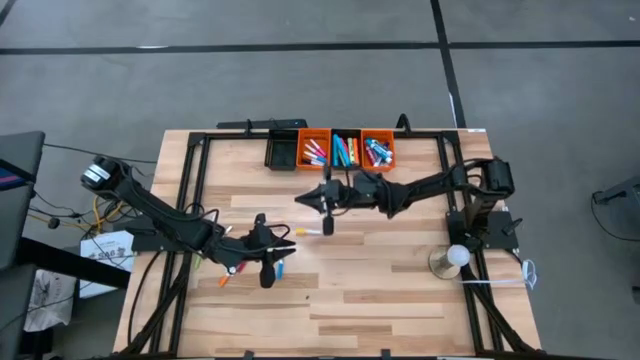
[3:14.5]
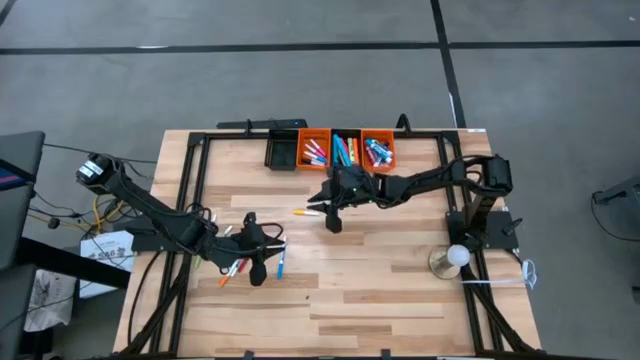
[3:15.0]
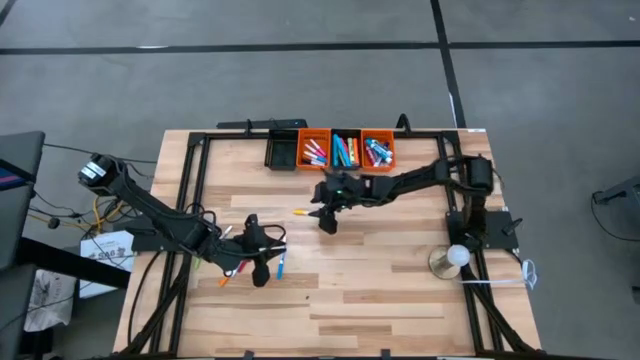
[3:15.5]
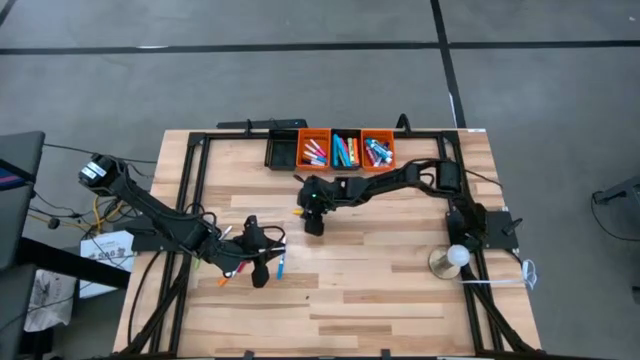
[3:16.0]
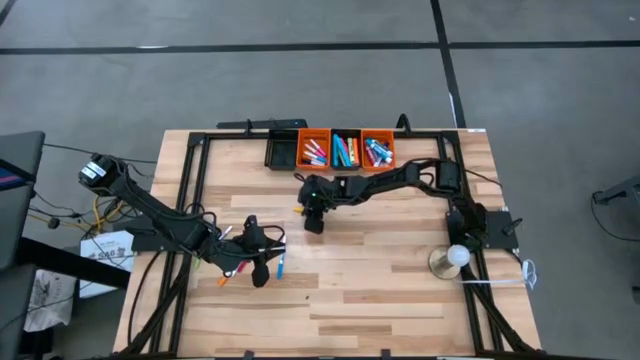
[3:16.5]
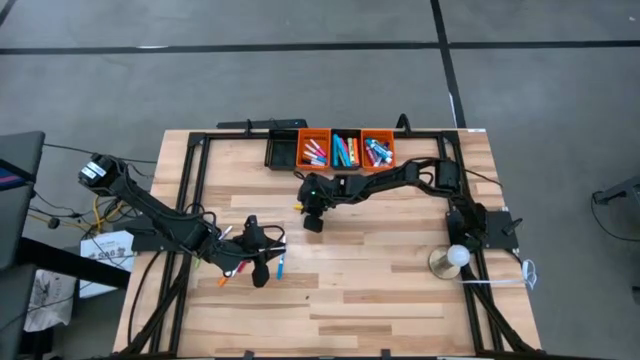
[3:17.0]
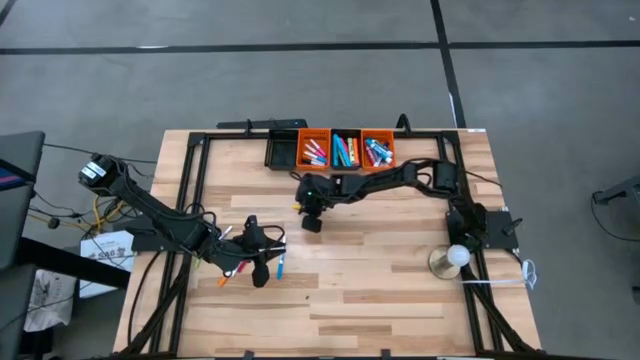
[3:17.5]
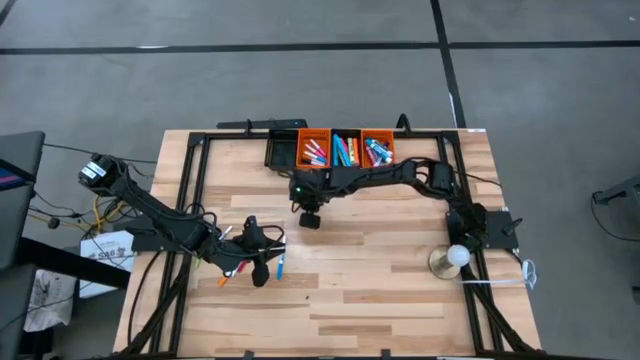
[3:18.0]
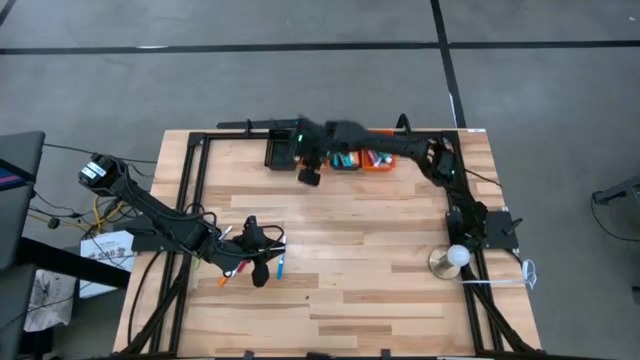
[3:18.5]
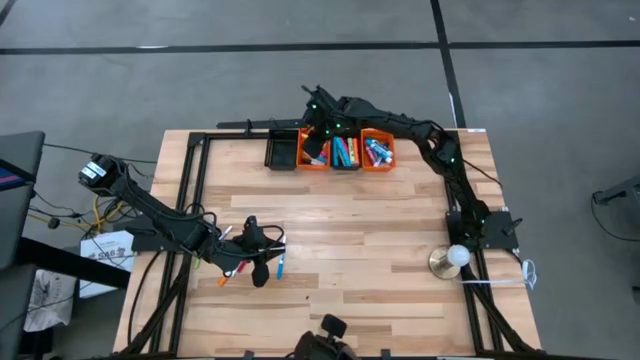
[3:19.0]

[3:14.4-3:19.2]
Task: Pick & Place Markers
Put the white yellow highlighter pen into the left orange bin

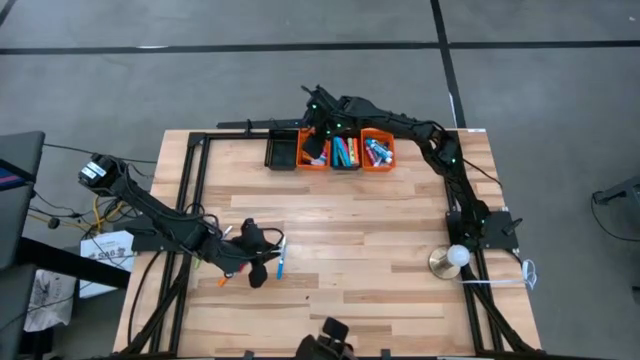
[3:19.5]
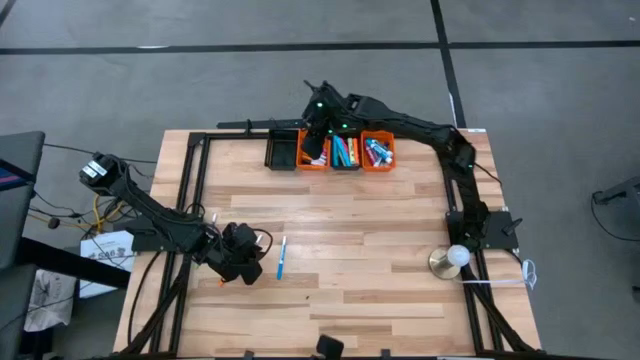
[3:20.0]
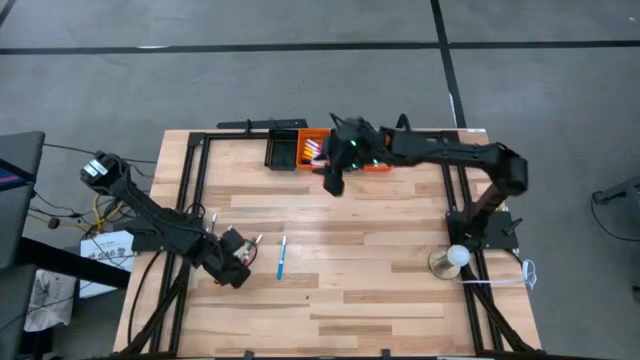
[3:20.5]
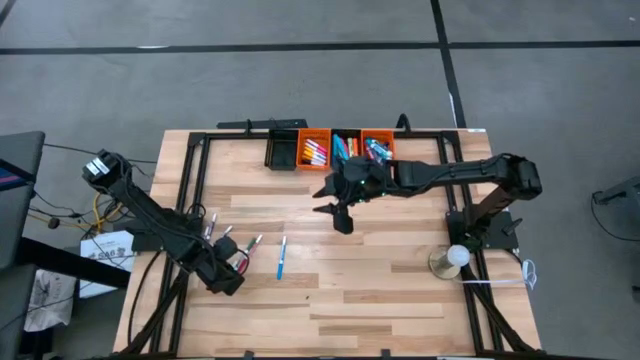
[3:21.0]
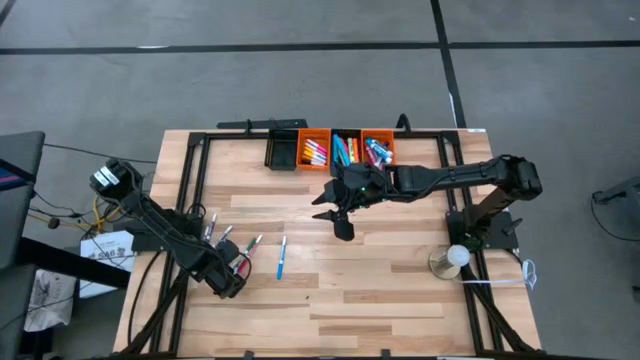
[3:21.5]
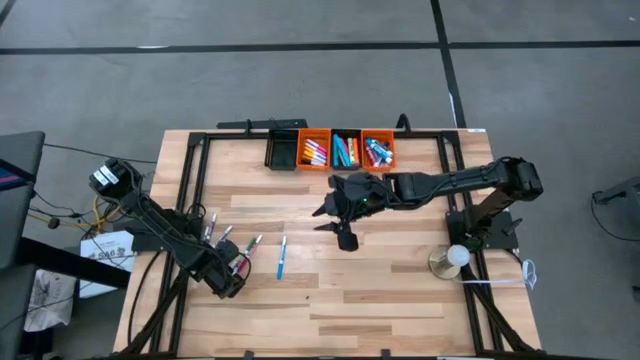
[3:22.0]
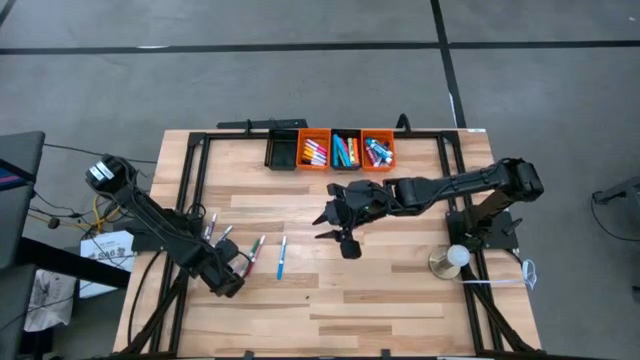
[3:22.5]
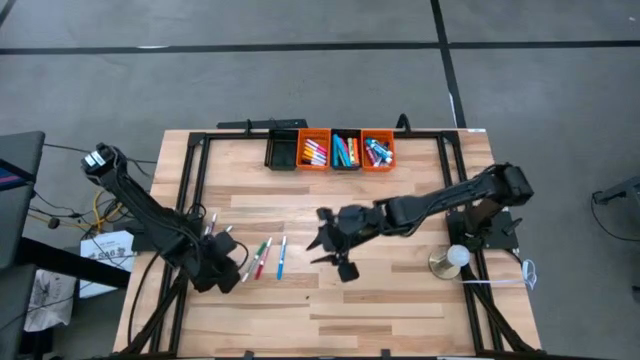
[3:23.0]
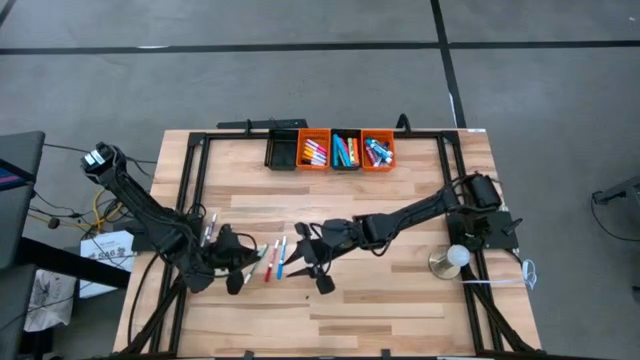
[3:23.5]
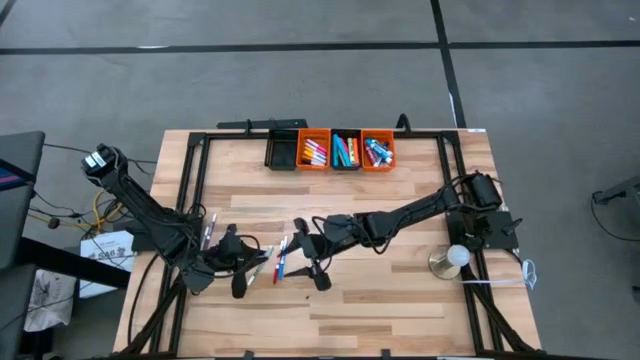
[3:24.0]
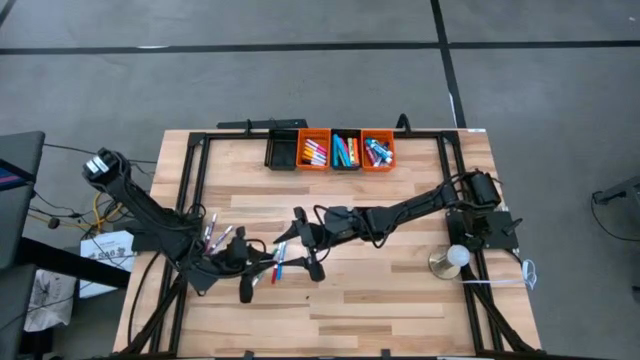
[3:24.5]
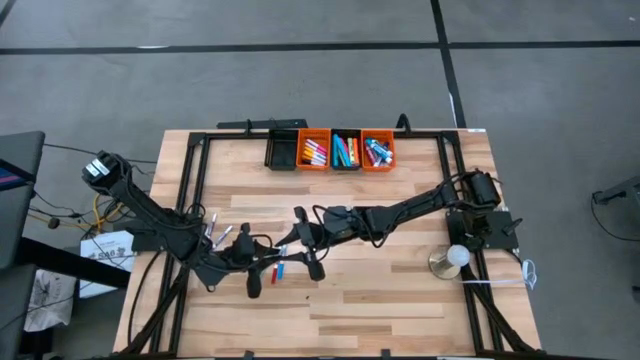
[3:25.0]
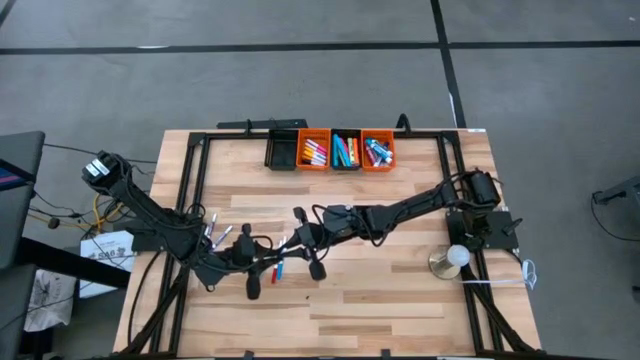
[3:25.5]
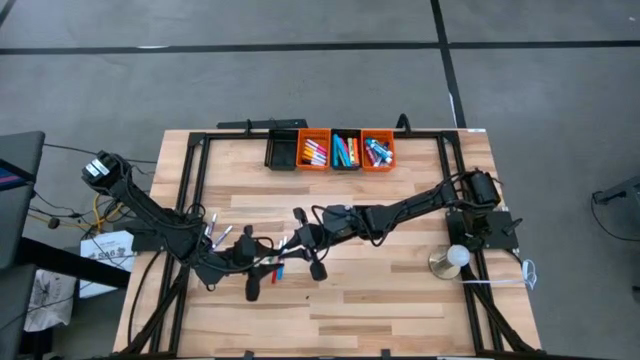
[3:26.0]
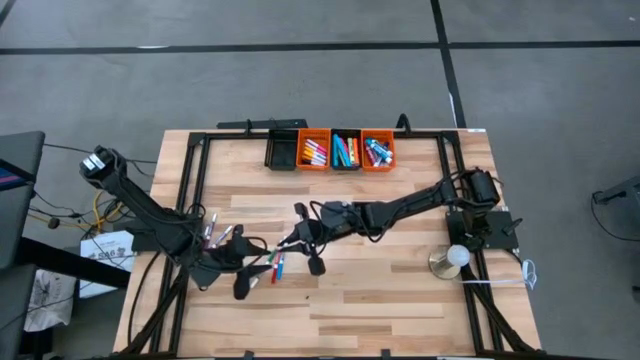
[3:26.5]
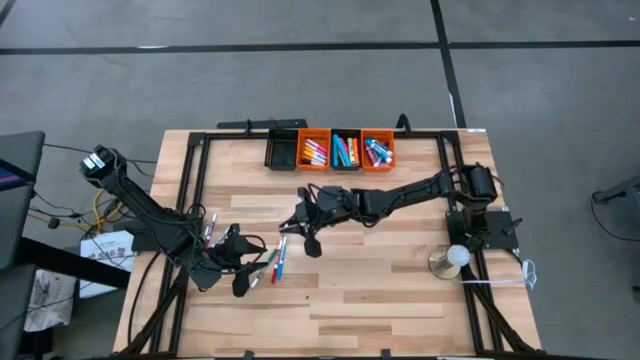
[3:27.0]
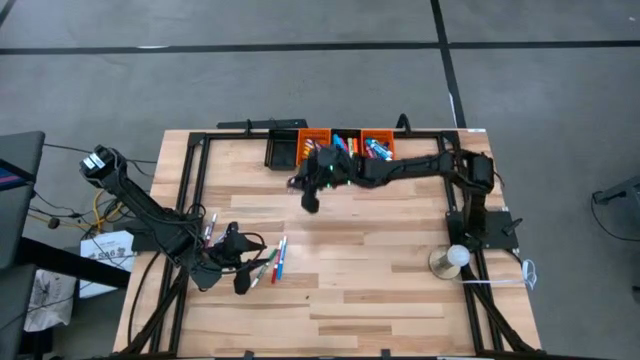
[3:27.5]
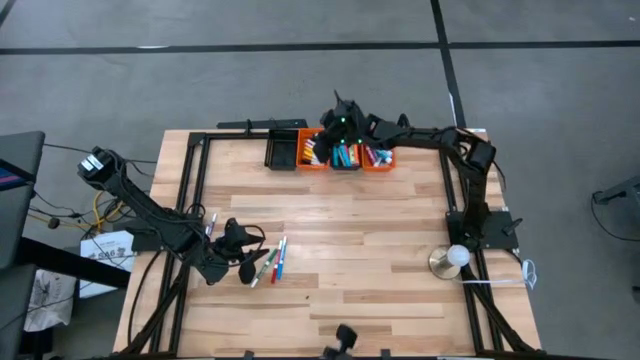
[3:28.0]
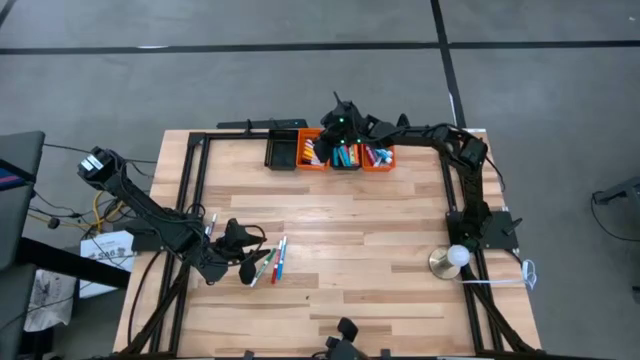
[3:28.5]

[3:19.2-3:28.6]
Put the white orange highlighter pen into the left orange bin

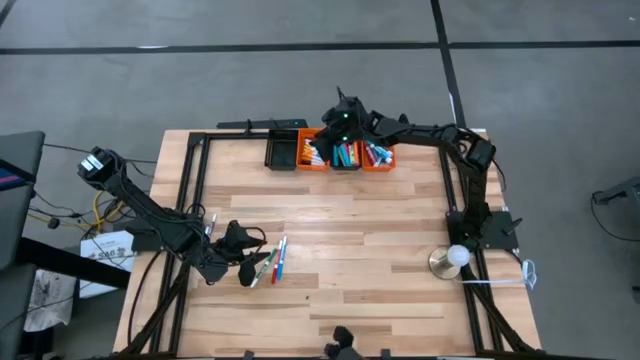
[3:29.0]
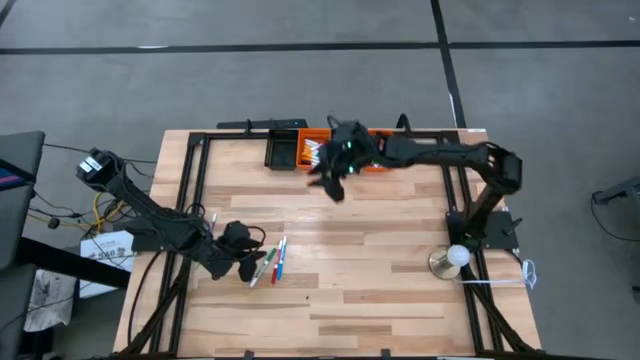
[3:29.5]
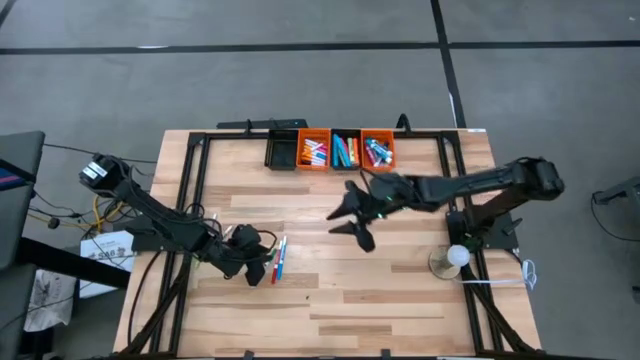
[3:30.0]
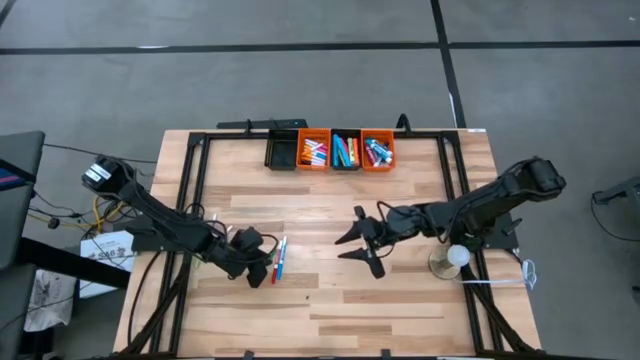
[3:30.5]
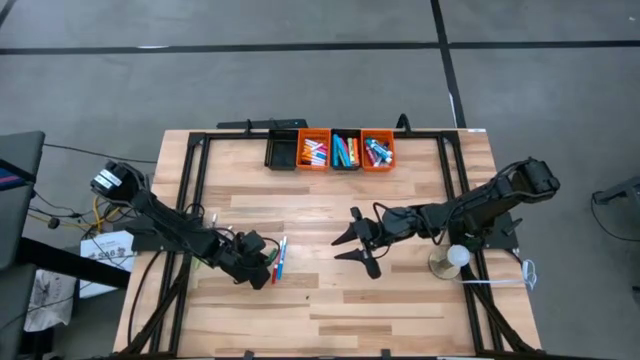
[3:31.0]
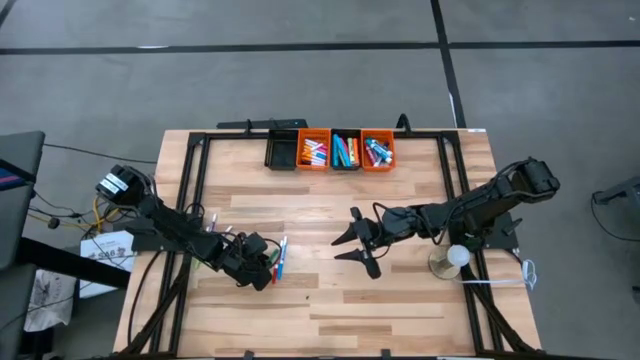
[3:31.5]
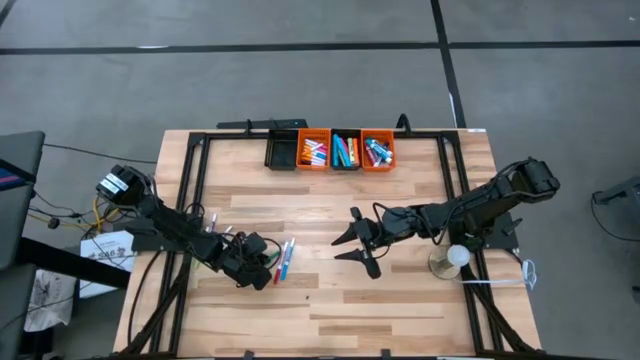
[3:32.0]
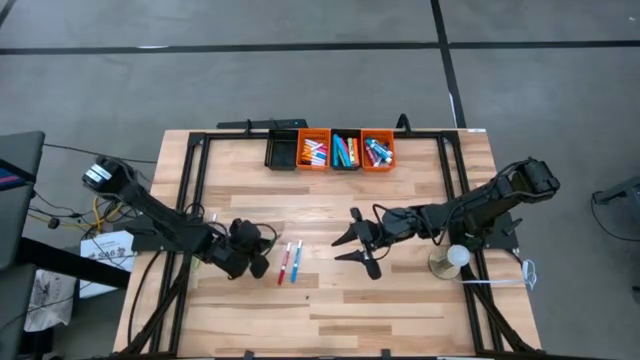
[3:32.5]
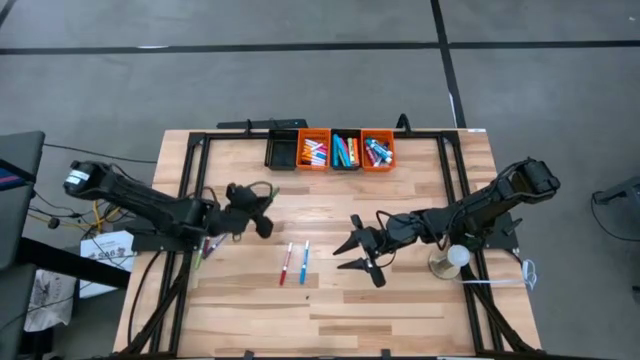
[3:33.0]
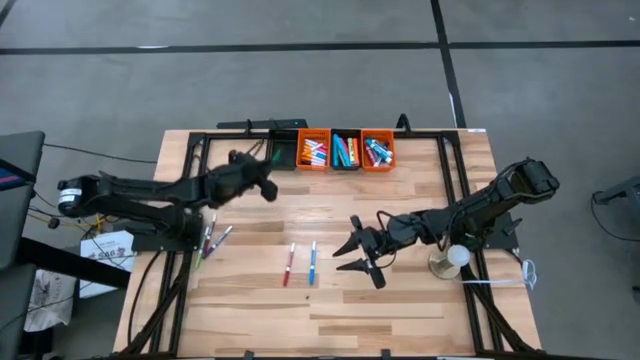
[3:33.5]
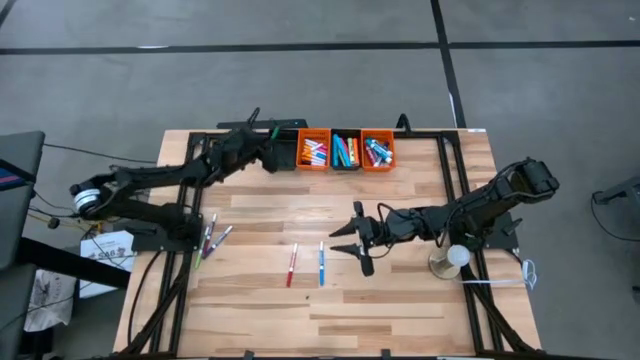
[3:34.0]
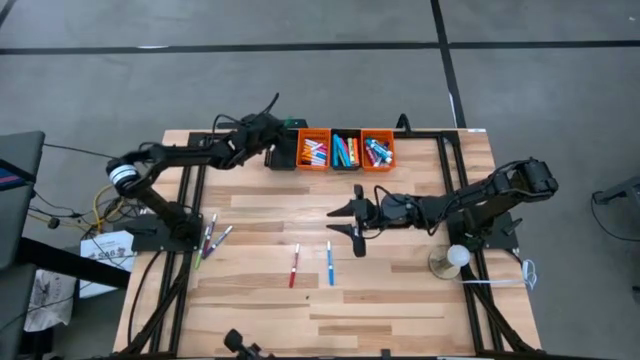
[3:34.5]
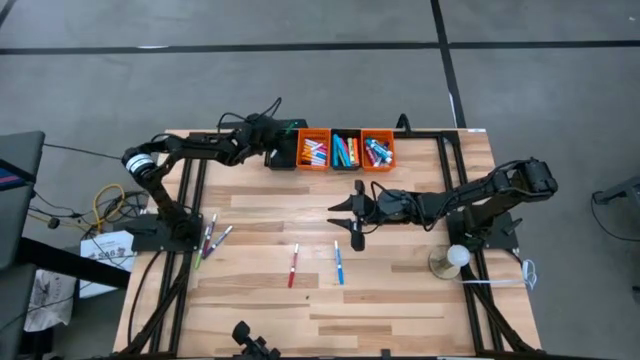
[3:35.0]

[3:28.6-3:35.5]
Put the dark green and white marker pen into the left black bin

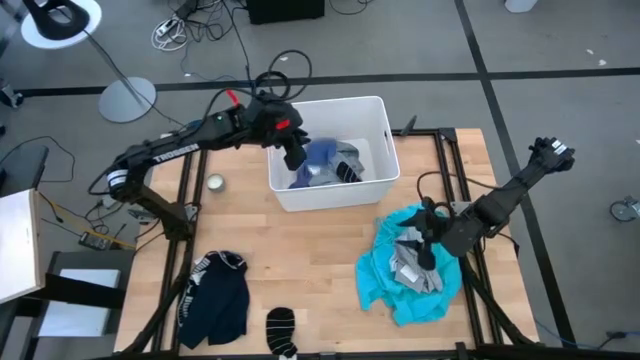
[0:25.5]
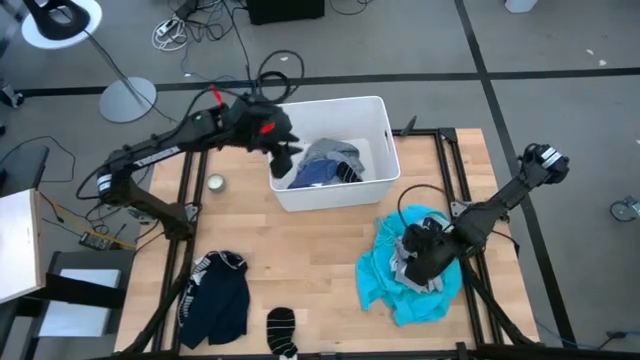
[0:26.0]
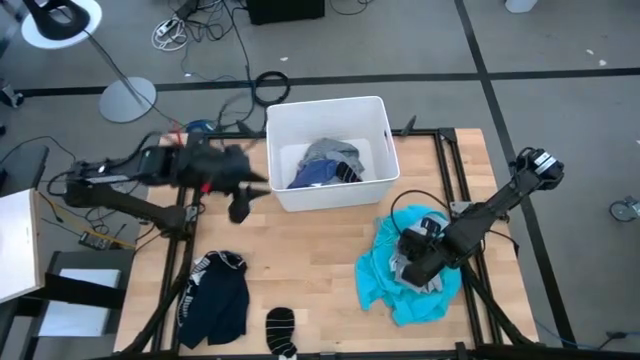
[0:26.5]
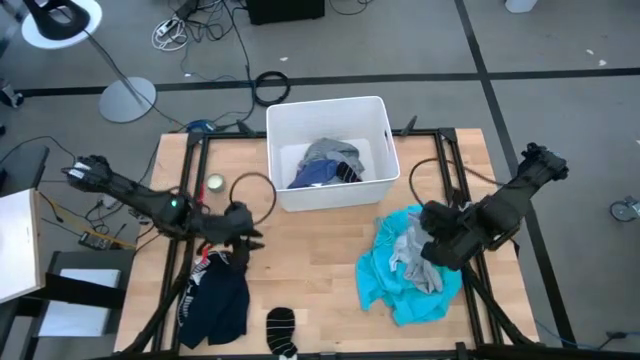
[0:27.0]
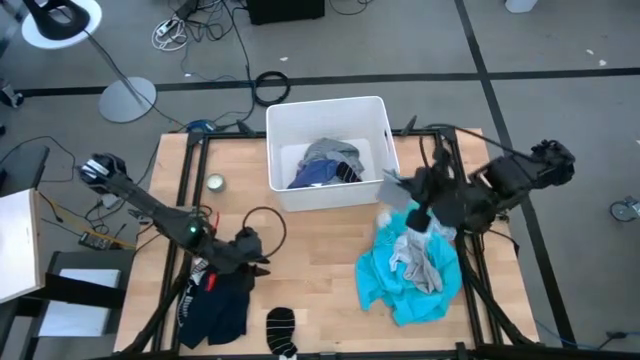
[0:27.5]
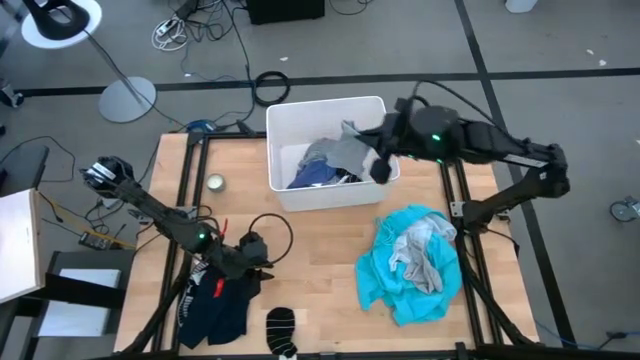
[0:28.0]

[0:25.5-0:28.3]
Task: Sort clothes
Put the gray sock into the white laundry organizer
